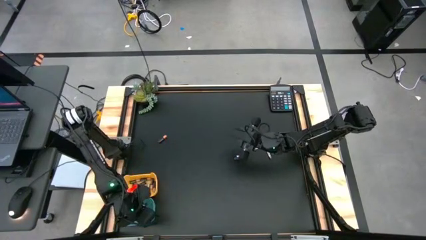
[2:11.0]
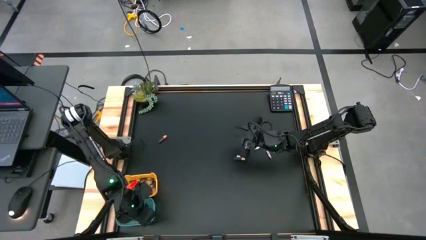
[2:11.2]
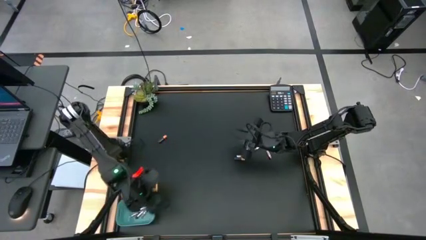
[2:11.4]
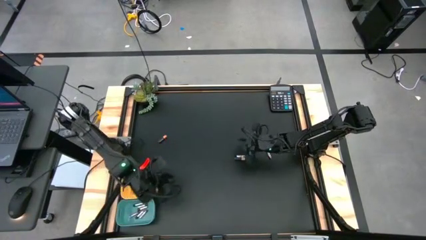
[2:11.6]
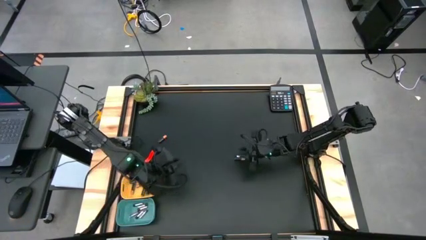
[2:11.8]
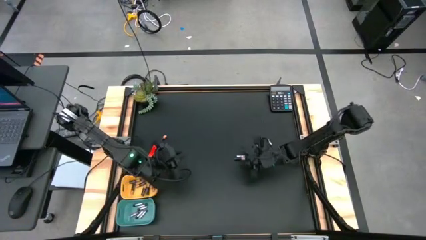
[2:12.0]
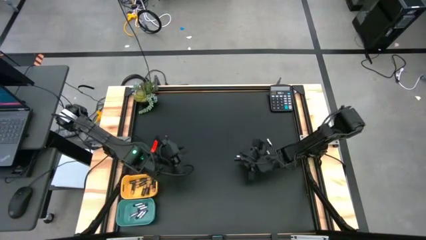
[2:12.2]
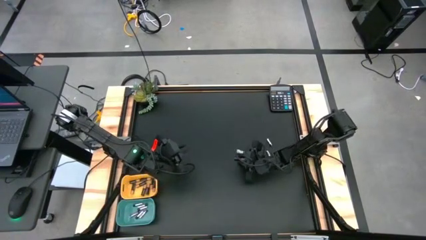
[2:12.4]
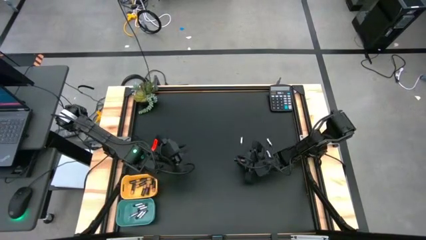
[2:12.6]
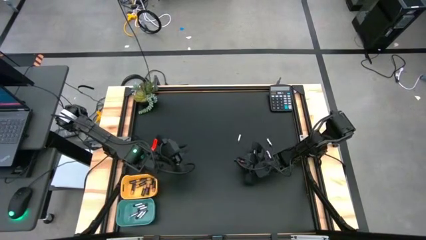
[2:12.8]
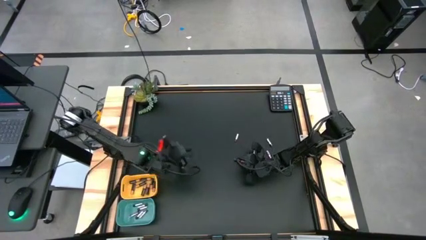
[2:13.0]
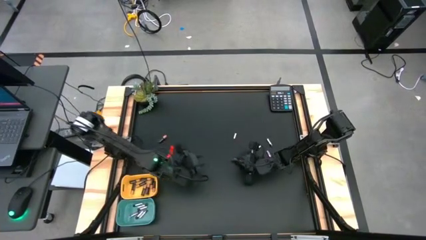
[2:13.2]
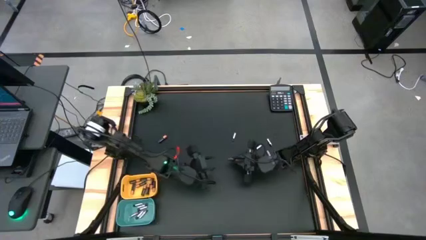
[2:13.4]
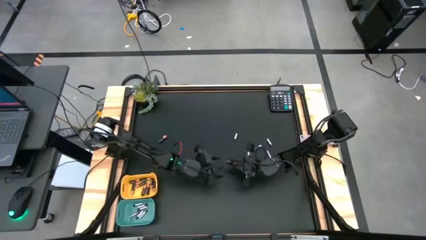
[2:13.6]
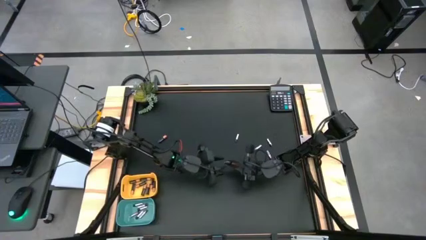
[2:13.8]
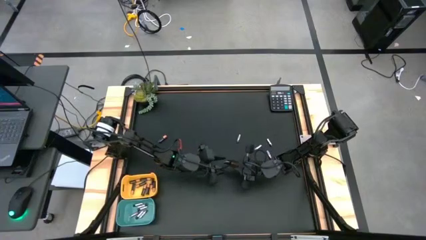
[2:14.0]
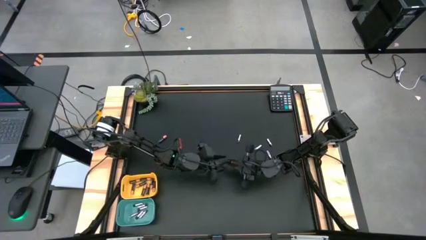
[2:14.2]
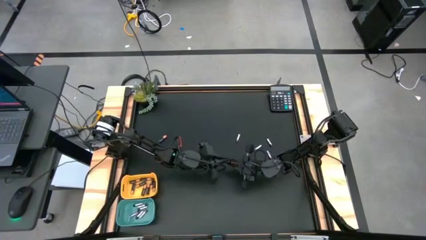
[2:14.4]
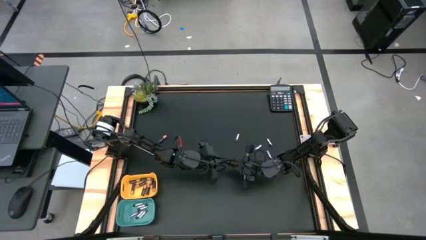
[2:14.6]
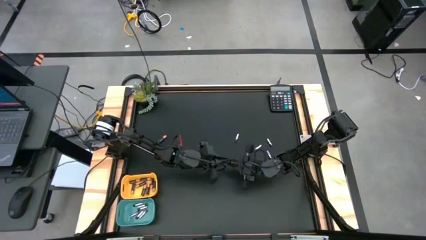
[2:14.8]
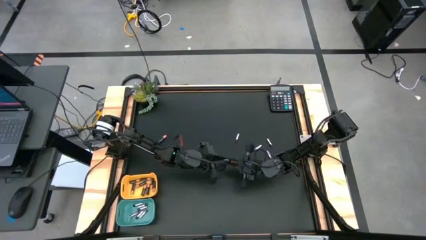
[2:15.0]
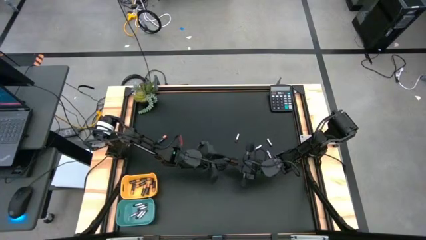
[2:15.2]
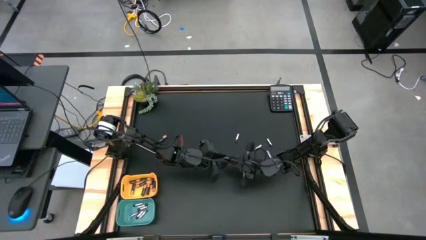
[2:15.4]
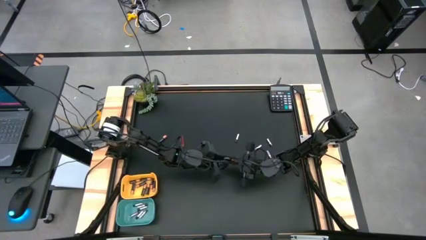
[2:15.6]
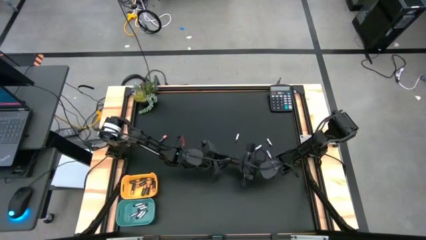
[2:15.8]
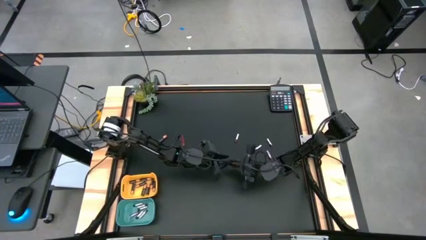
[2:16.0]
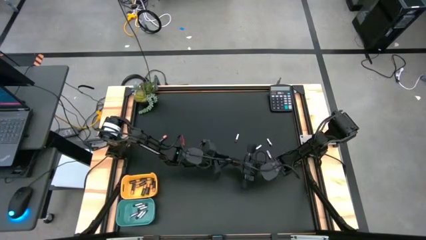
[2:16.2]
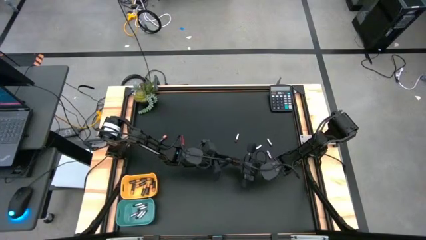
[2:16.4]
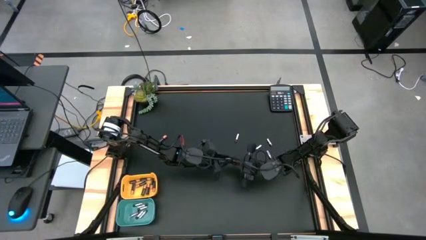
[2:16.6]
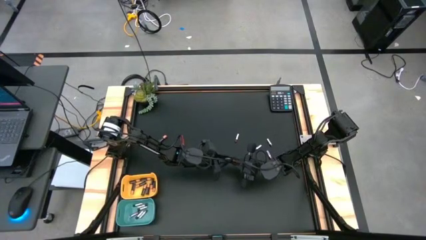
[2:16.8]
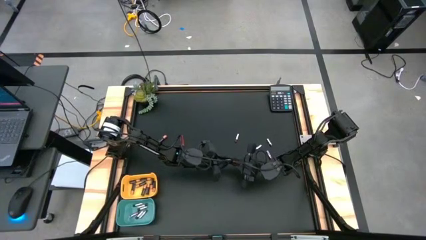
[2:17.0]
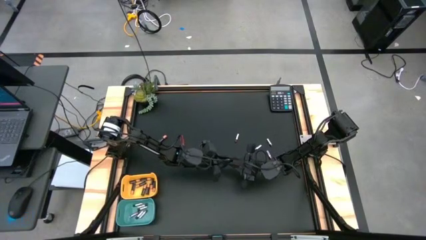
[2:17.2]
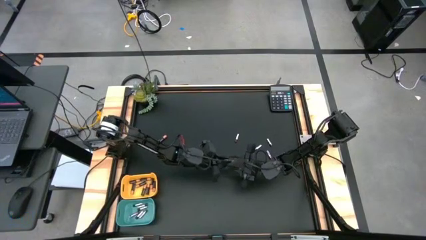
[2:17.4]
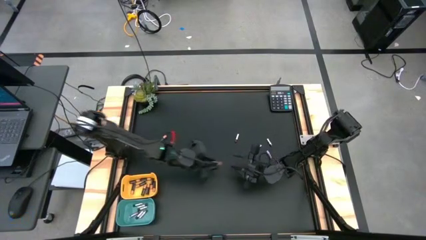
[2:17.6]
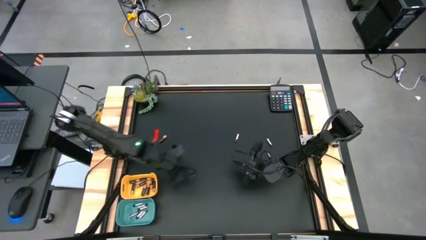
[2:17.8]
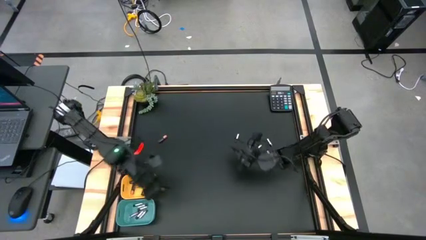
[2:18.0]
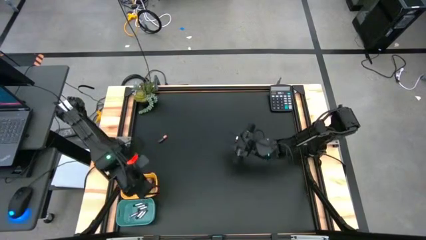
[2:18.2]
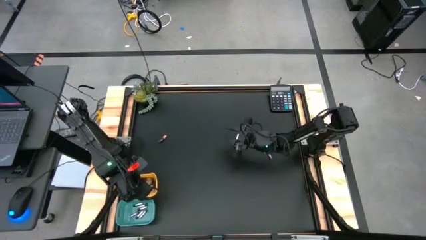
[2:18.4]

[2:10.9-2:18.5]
Task: Sort batteries
Put the right black battery into the yellow bin

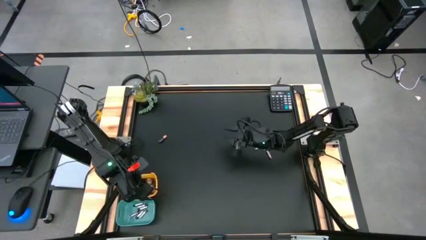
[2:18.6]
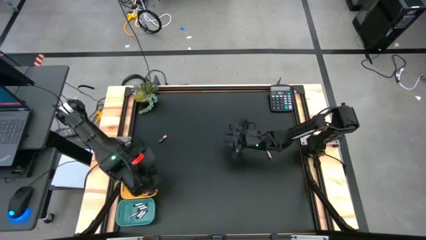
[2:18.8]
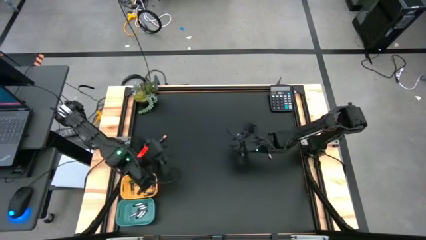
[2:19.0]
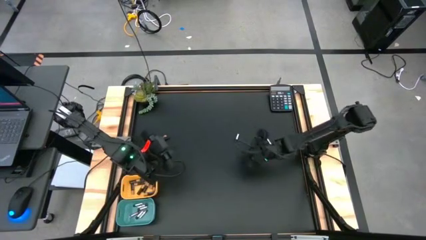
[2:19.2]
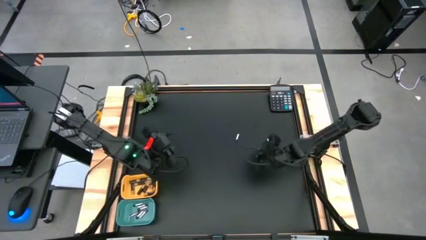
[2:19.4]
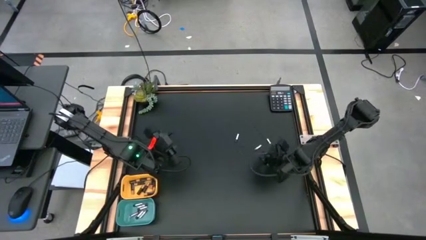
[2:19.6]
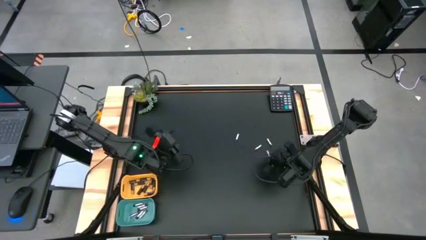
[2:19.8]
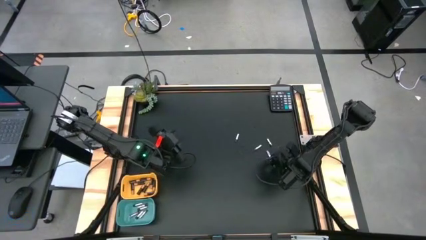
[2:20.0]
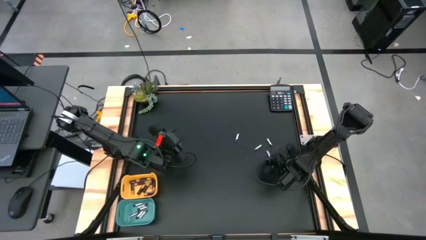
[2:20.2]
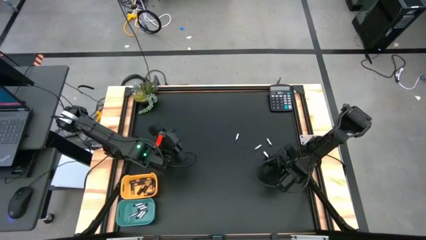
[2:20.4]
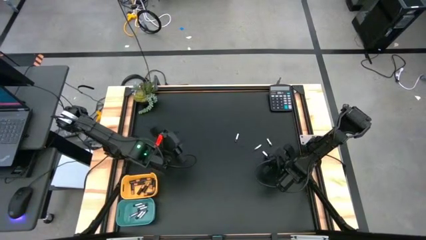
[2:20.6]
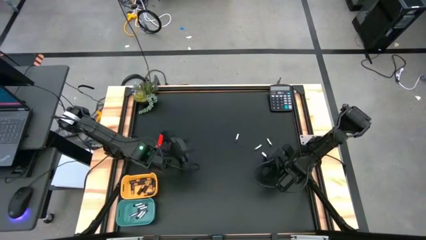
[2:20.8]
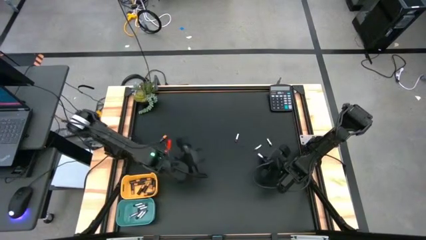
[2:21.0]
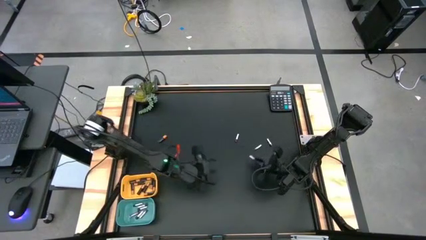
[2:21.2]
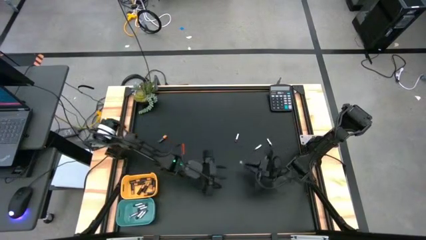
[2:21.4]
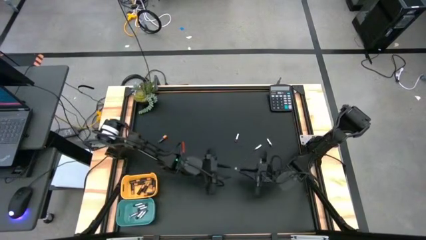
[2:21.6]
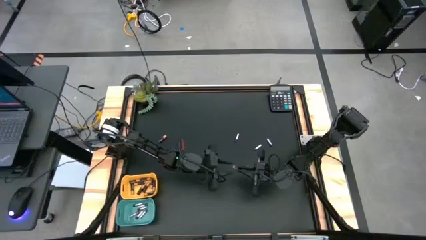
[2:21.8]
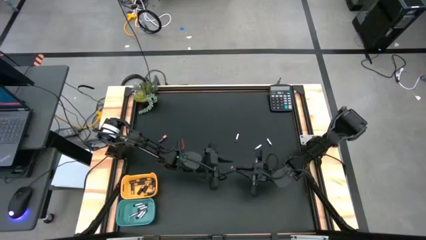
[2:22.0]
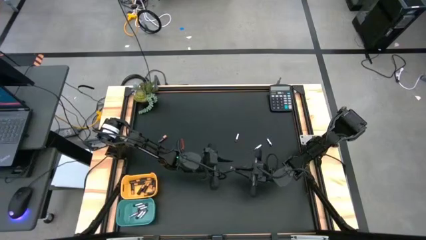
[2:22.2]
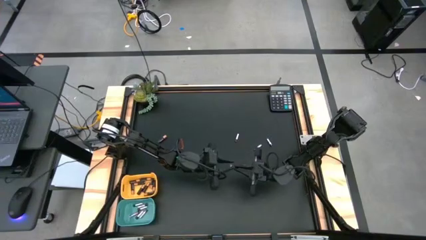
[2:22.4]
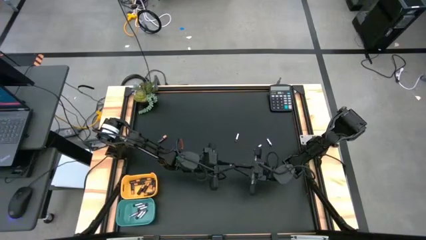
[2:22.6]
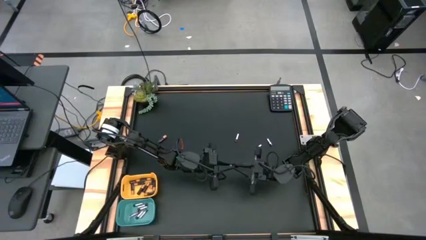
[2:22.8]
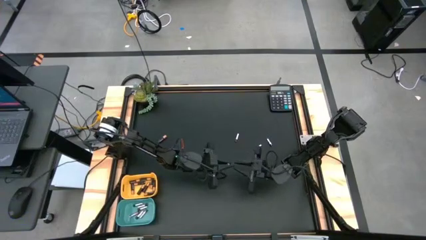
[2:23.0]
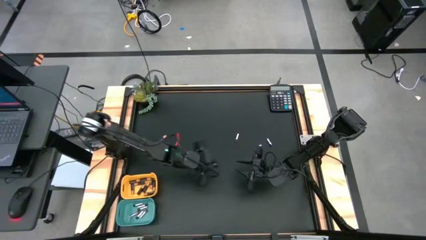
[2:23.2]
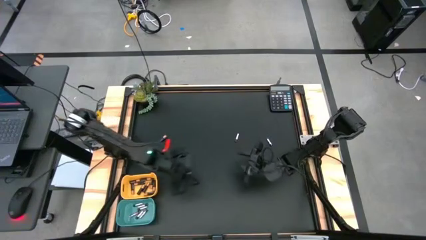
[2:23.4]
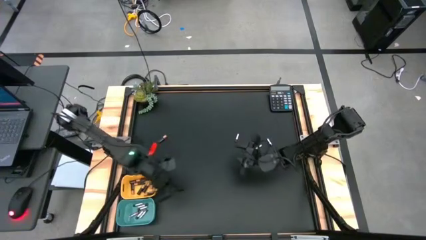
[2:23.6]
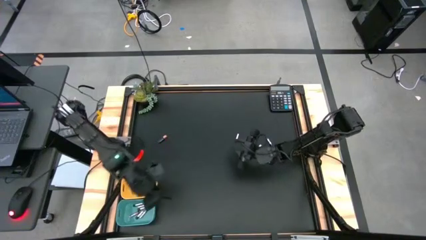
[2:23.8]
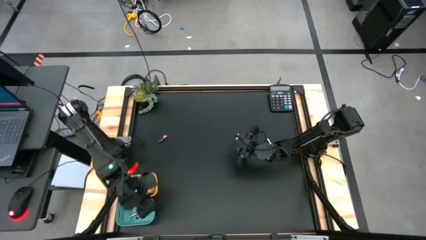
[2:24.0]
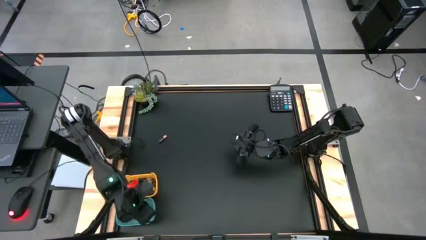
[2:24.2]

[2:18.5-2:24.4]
Put the silver battery into the green bin

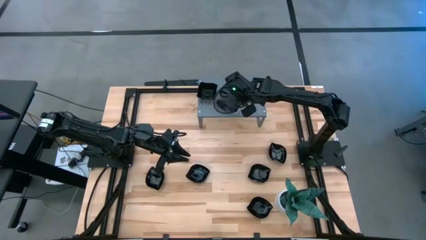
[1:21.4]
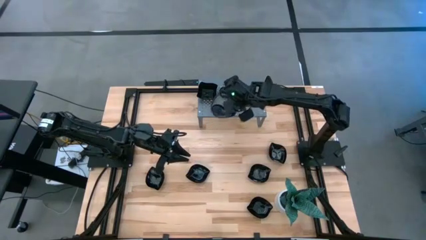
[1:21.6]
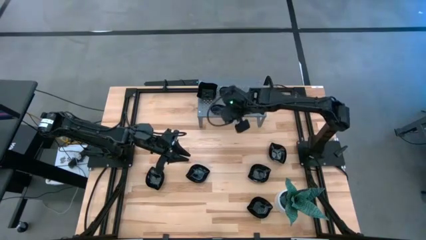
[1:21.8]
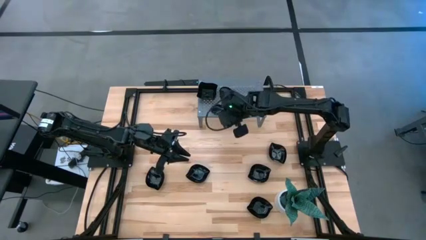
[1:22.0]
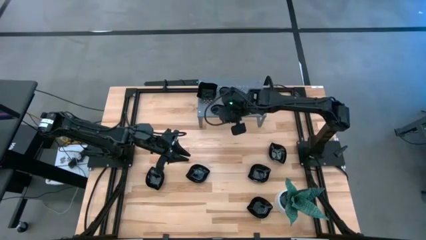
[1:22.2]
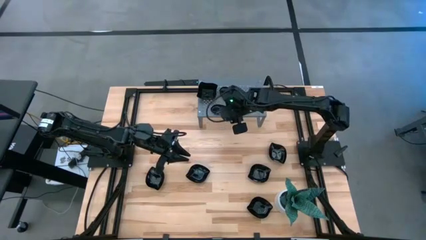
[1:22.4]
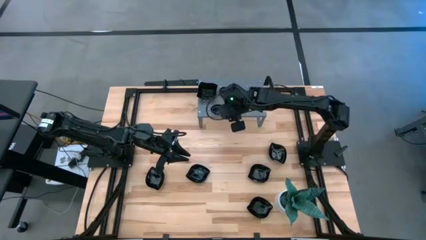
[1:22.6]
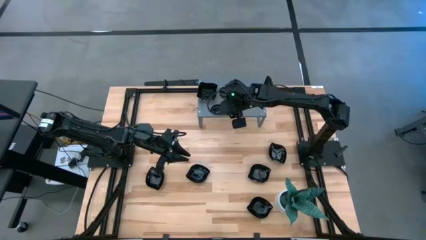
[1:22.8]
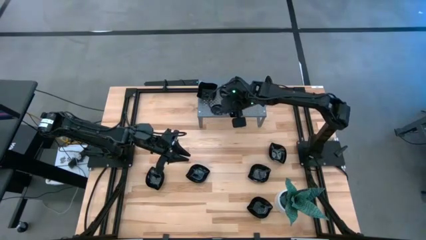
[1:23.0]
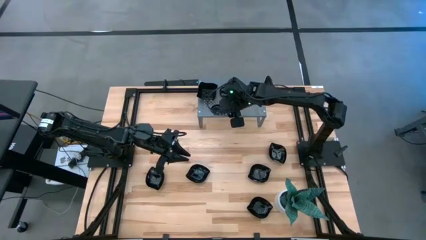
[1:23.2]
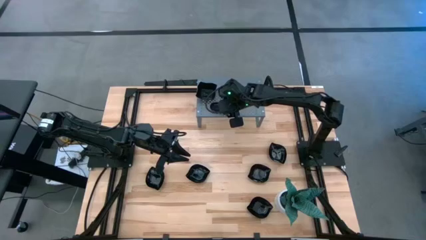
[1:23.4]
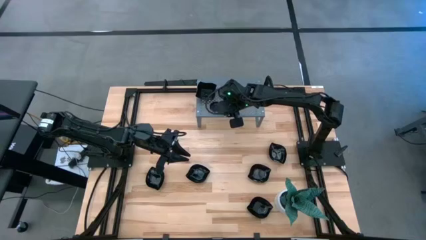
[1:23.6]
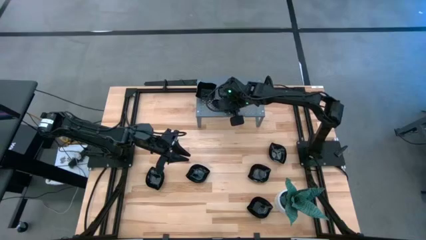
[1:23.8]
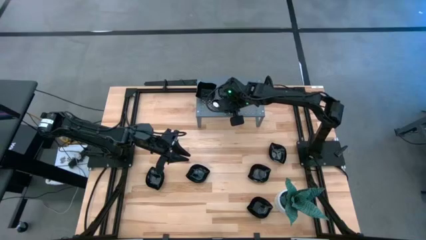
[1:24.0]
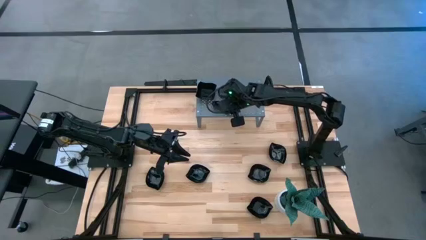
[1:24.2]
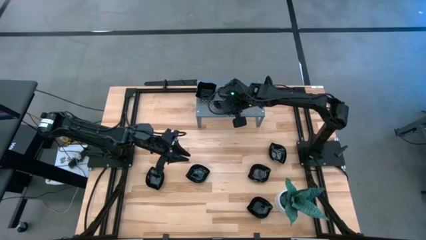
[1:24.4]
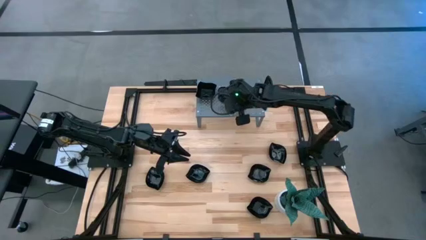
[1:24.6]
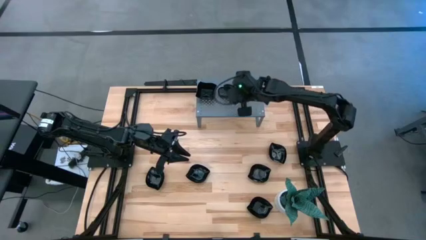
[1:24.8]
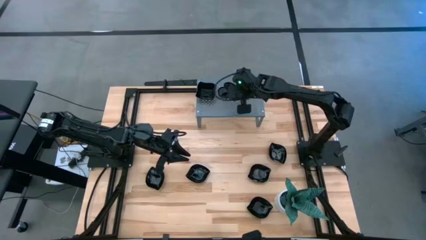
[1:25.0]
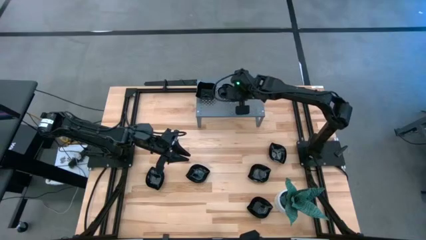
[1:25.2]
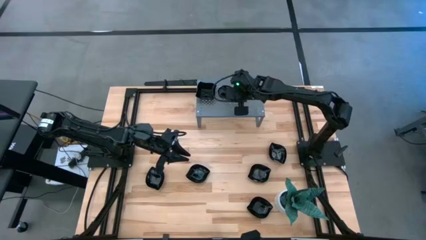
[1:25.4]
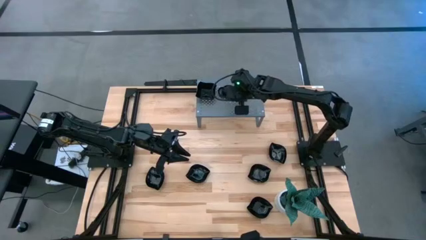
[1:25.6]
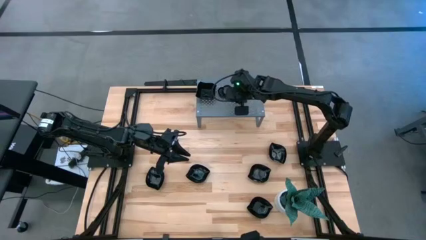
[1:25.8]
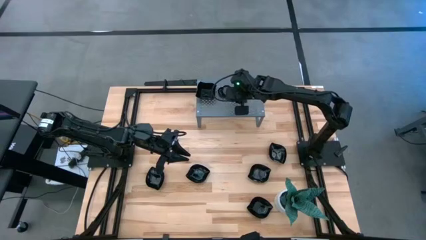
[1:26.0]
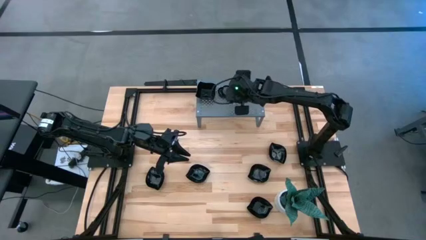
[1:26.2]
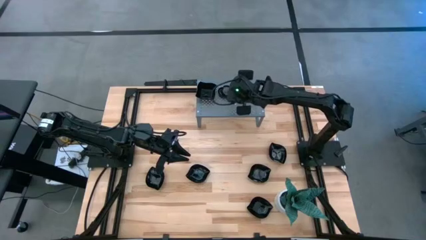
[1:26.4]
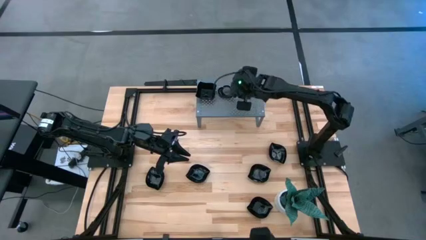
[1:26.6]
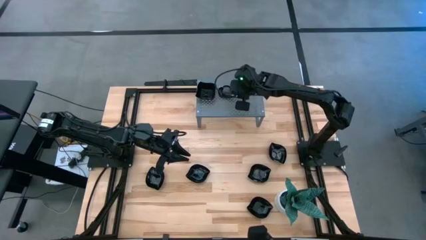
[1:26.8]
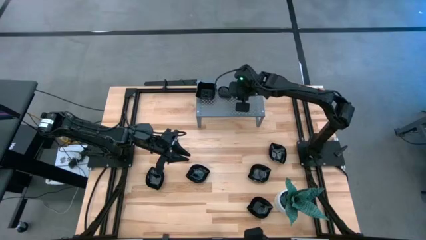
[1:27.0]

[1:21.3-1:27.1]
Task: Pick & Place Mini shaped plates
Stack the drop-shaped plate on top of the drop-shaped plate on the shelf
